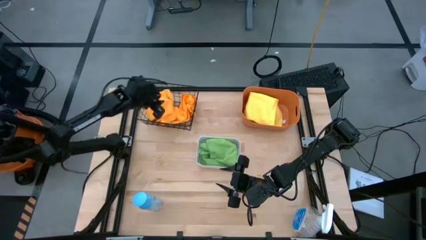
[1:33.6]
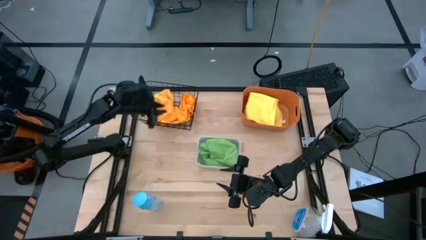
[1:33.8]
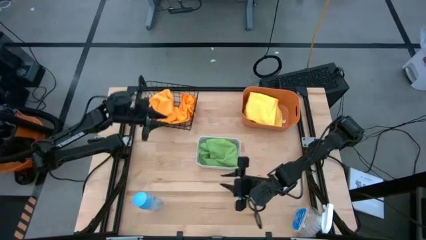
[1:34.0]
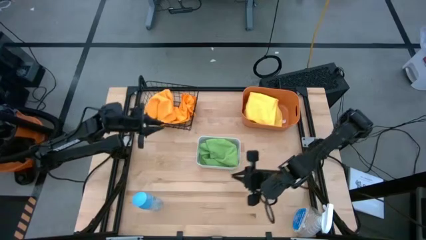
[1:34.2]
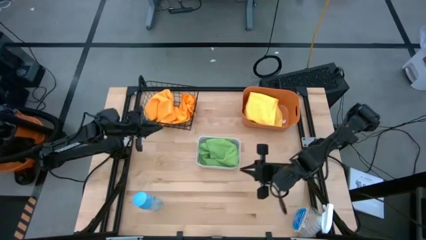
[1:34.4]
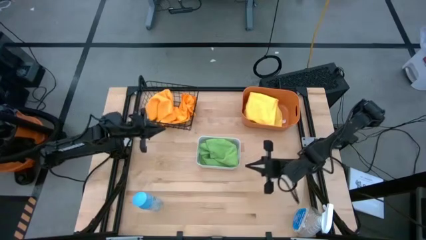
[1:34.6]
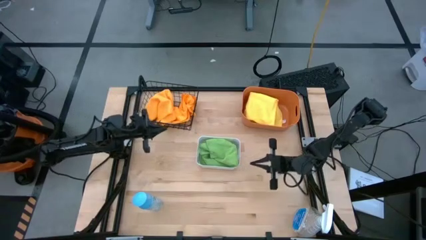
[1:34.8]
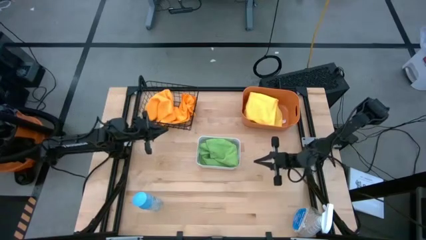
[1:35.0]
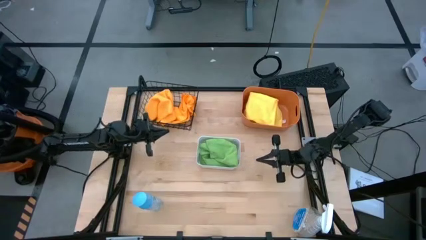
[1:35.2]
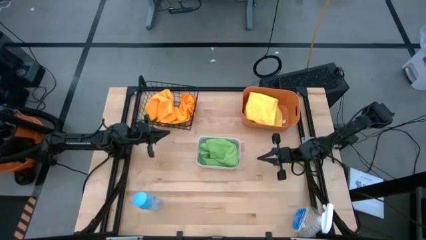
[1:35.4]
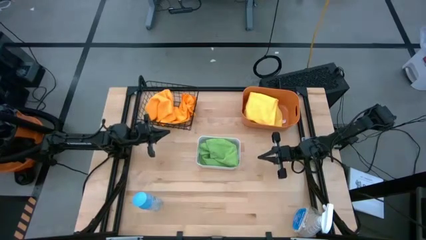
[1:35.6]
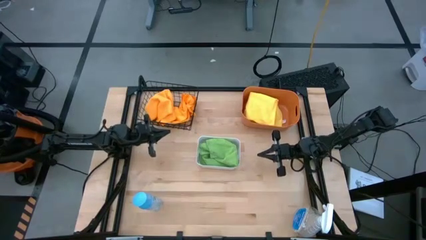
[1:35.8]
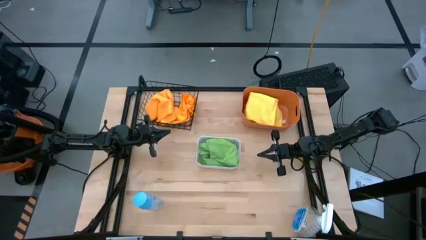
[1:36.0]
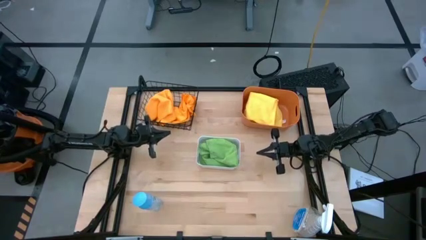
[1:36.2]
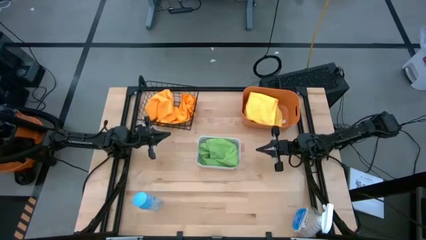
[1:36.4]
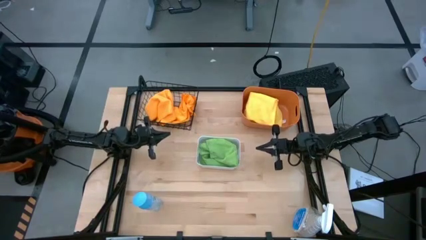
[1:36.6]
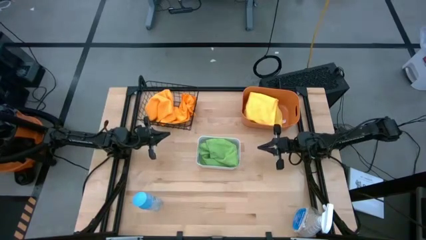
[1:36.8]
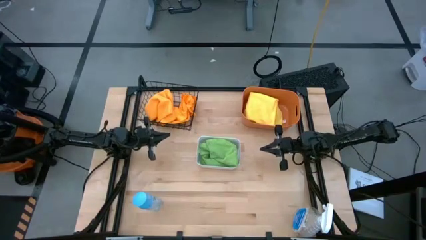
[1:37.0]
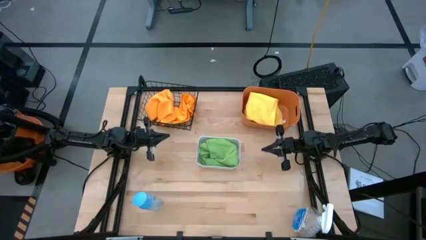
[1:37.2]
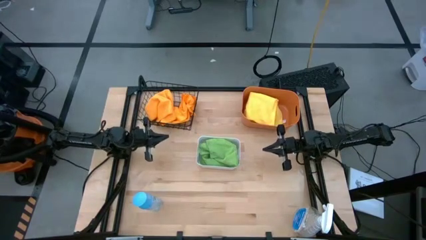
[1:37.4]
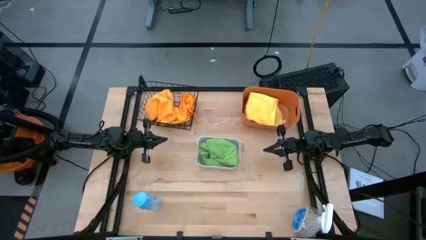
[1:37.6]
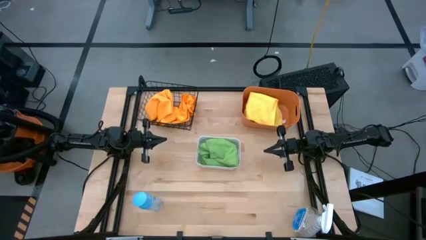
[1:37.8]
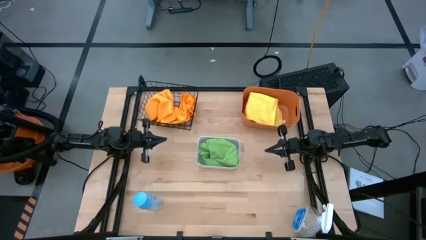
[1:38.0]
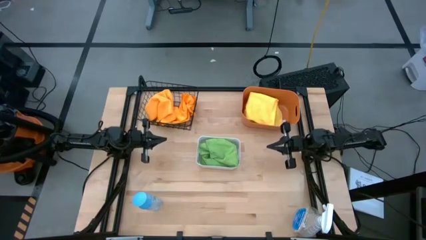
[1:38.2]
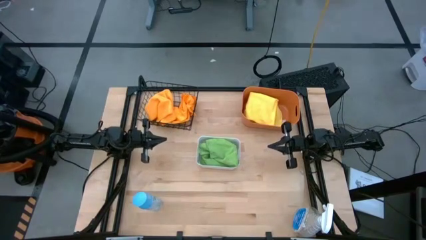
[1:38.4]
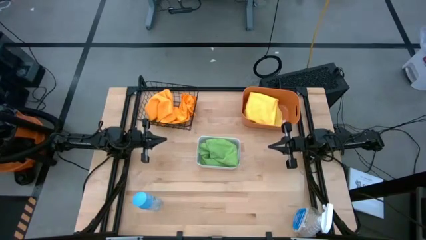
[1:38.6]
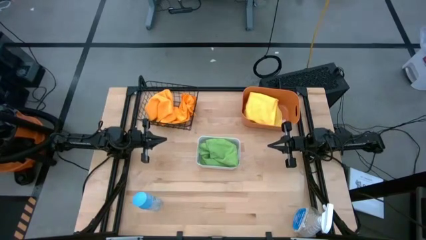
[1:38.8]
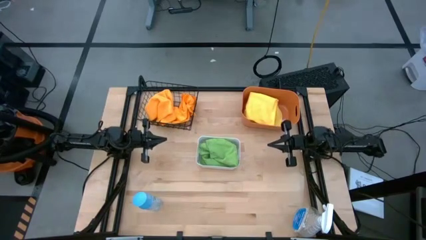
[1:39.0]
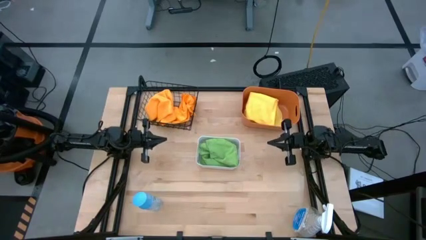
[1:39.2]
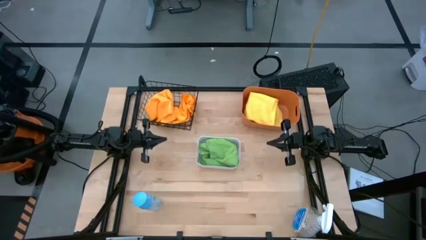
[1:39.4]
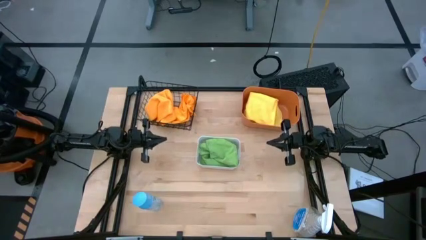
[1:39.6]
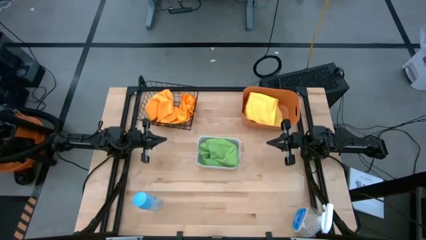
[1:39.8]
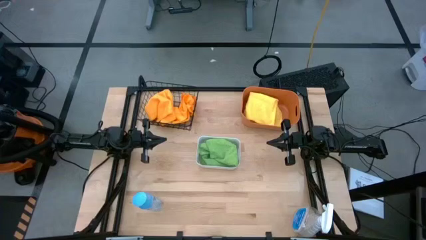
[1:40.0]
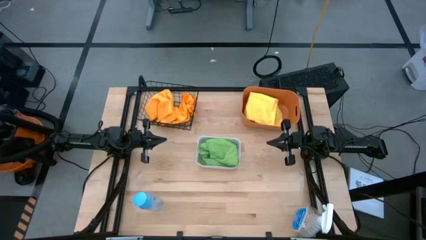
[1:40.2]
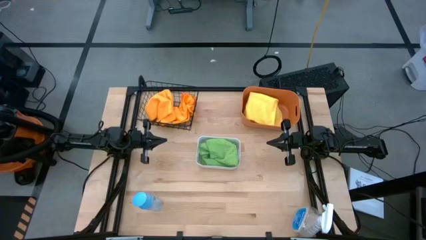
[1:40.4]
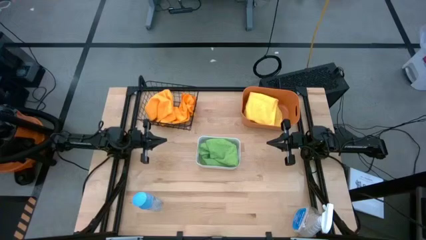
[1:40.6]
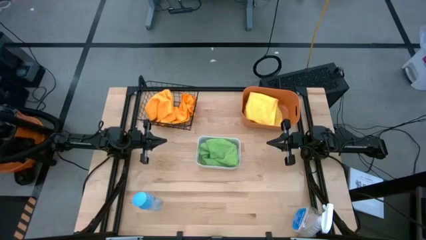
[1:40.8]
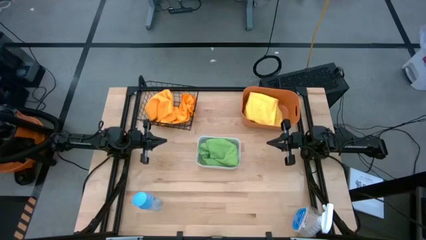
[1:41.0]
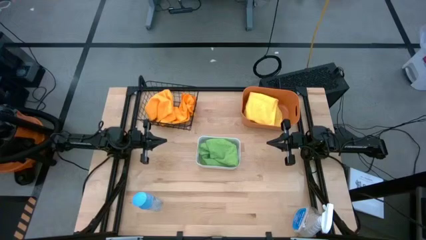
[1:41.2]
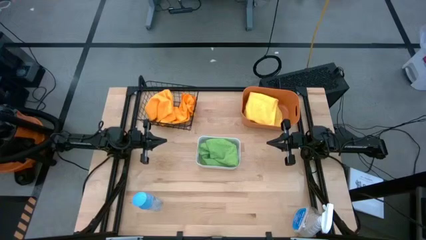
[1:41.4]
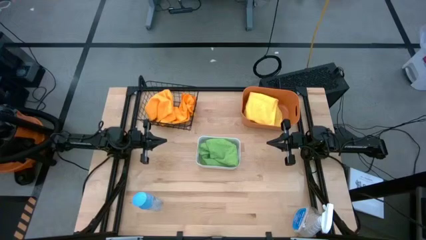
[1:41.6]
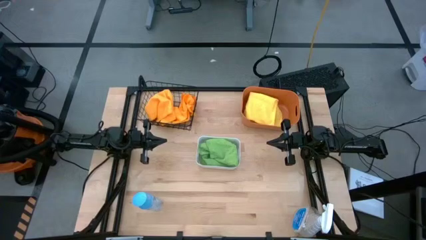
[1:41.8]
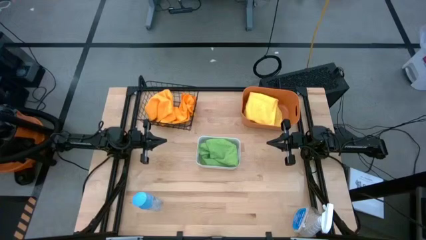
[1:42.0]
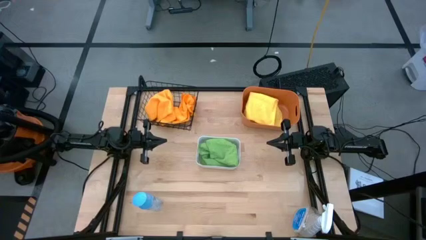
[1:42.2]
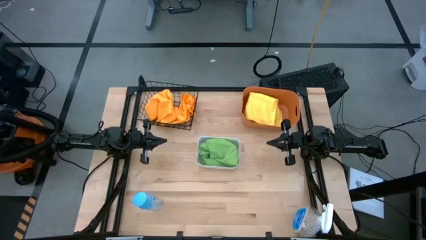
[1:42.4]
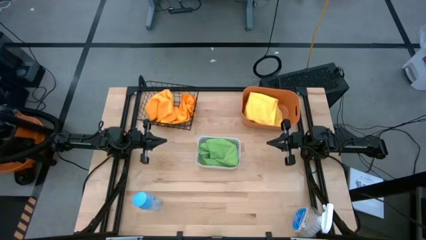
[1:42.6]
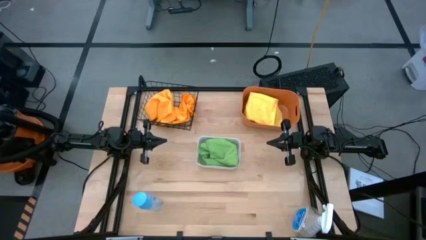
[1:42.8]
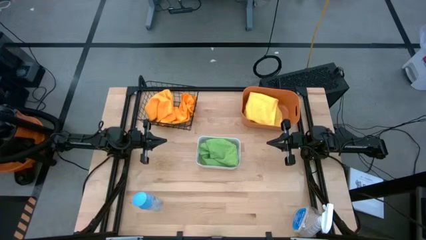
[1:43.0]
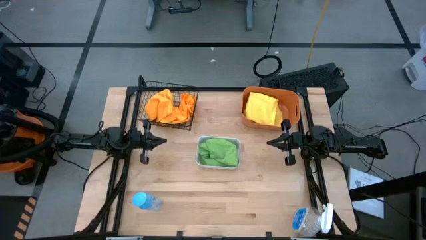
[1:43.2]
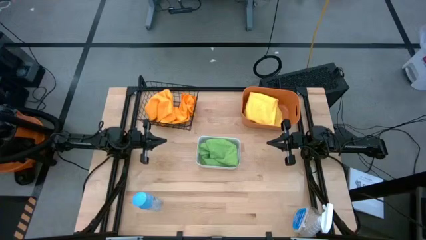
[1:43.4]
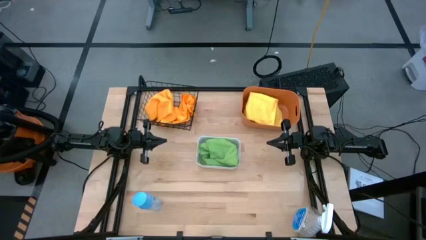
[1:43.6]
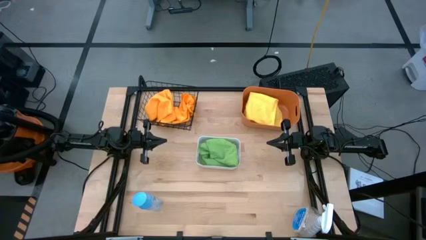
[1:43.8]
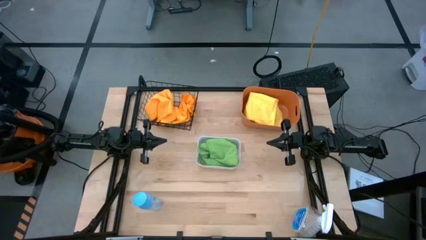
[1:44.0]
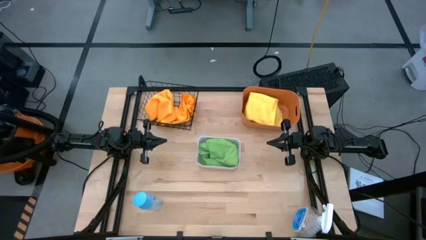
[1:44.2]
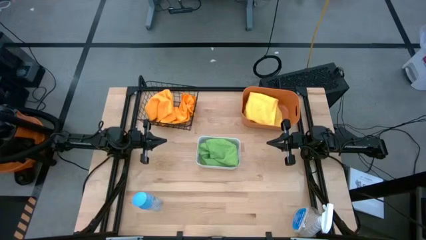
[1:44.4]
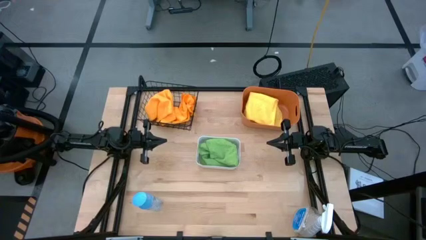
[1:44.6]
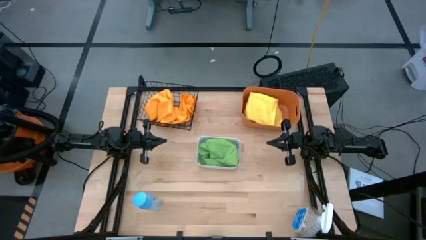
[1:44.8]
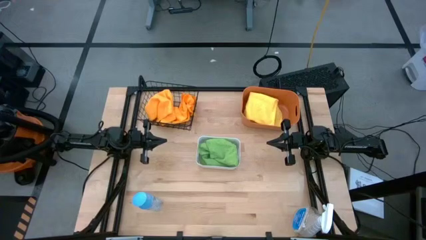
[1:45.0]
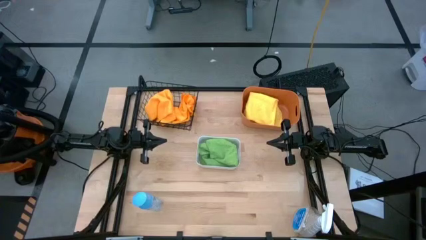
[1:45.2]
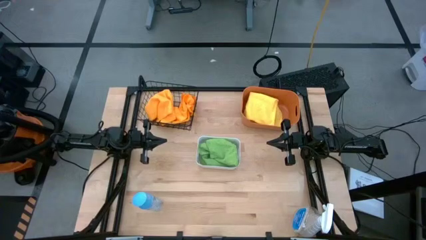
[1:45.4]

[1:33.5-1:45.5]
Task: Sort microfiber towel by color & place in baskets
Return to Home Position
